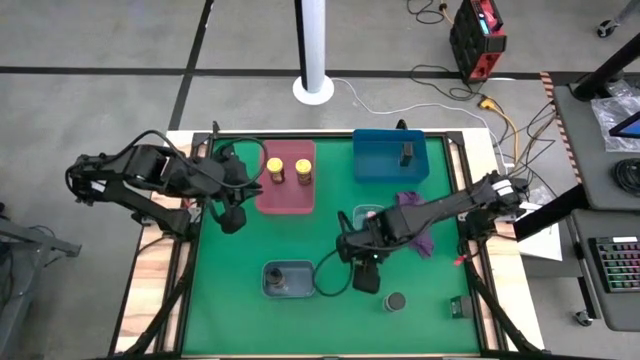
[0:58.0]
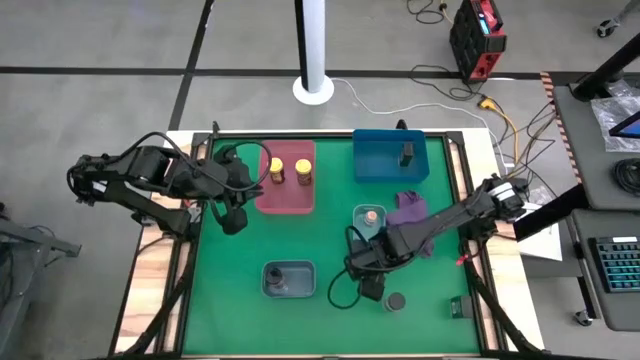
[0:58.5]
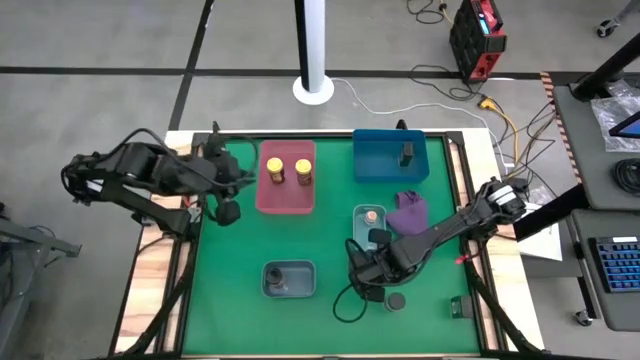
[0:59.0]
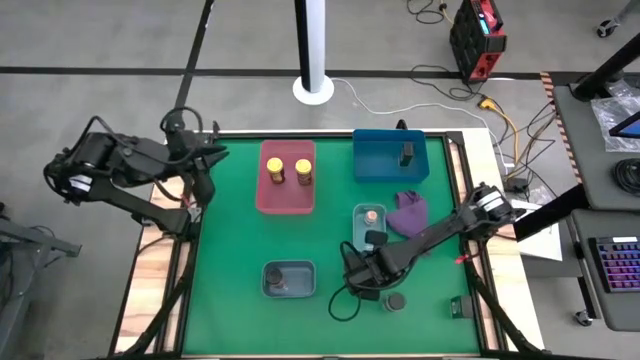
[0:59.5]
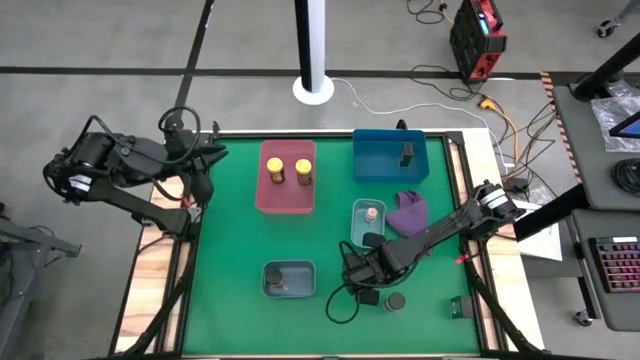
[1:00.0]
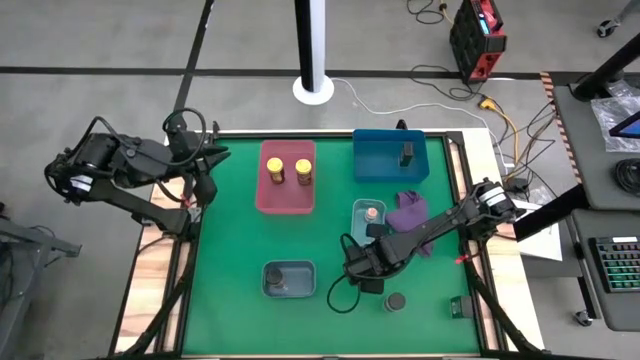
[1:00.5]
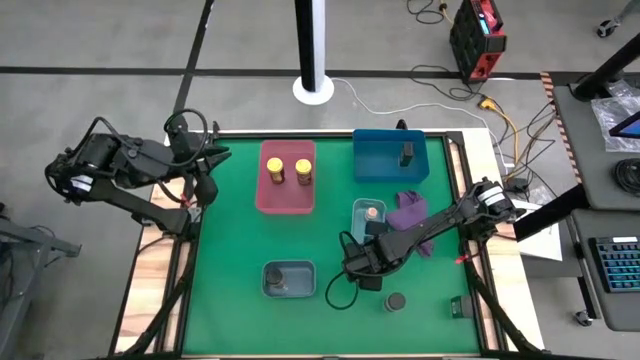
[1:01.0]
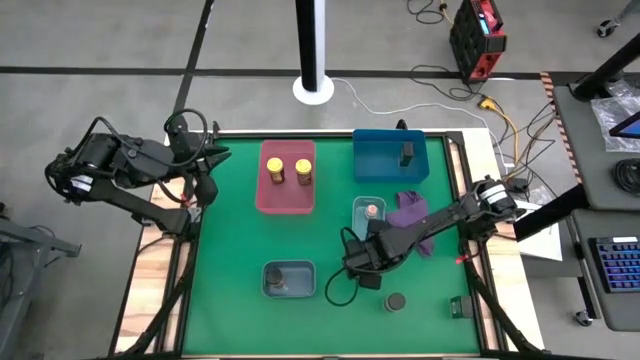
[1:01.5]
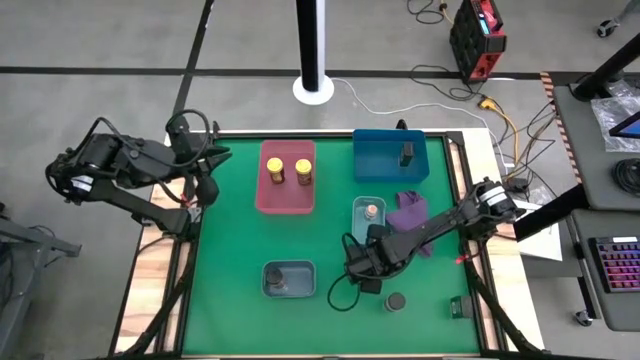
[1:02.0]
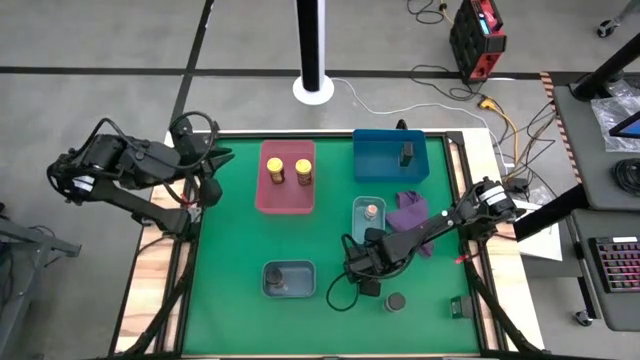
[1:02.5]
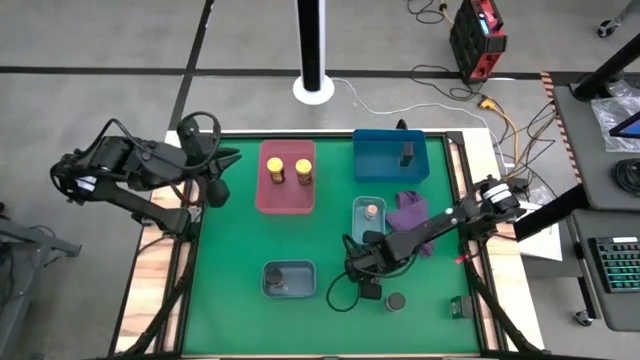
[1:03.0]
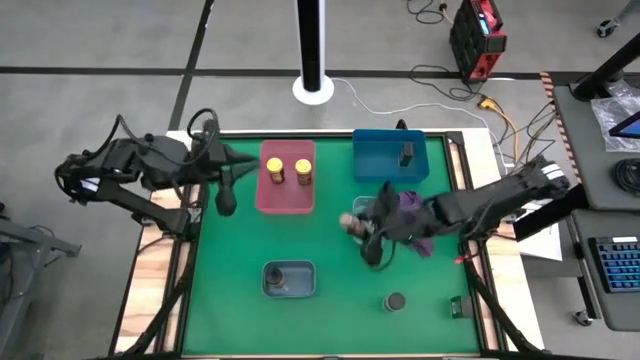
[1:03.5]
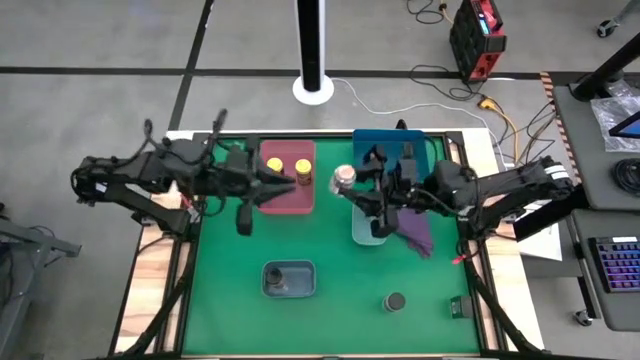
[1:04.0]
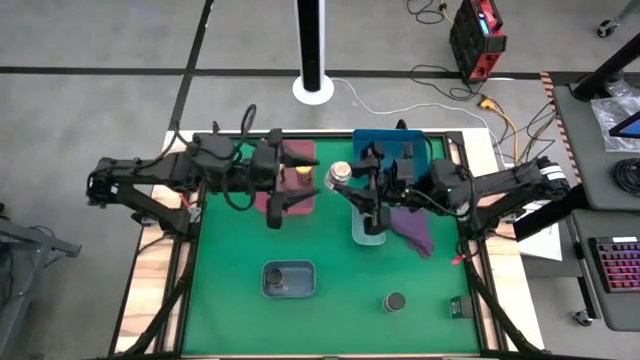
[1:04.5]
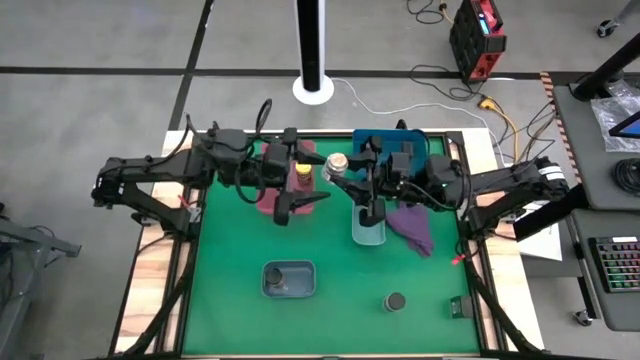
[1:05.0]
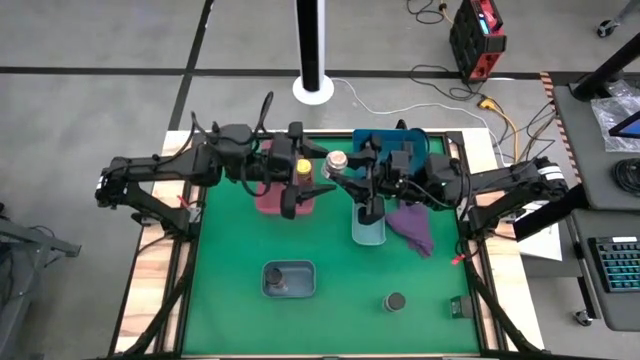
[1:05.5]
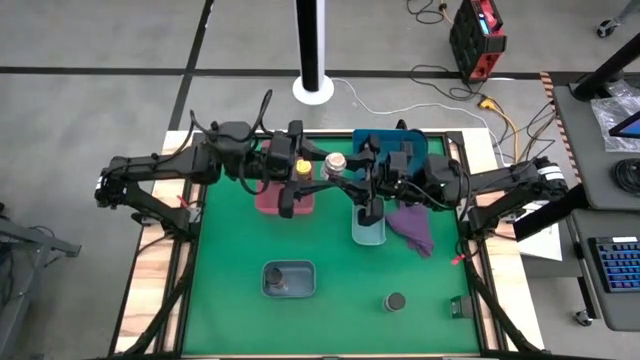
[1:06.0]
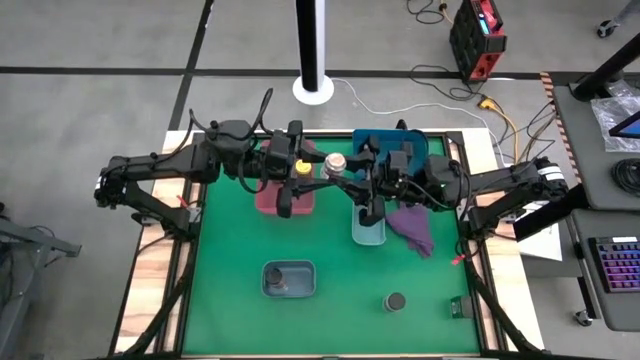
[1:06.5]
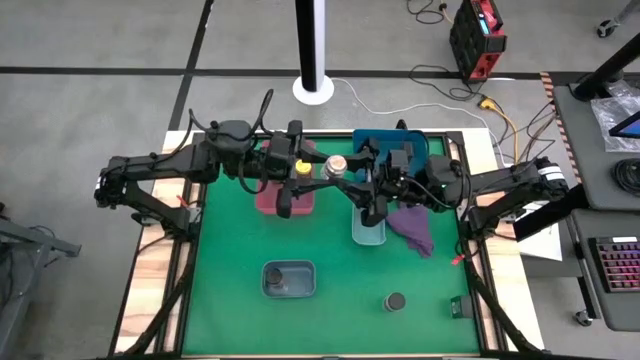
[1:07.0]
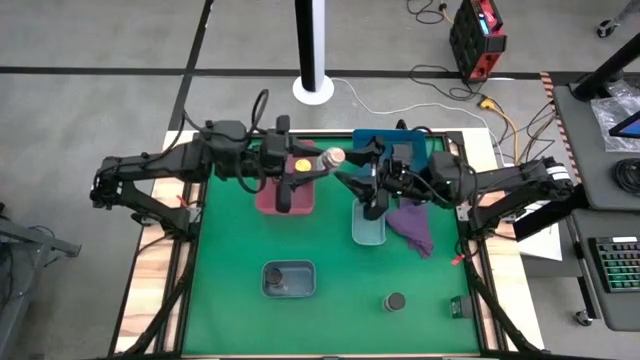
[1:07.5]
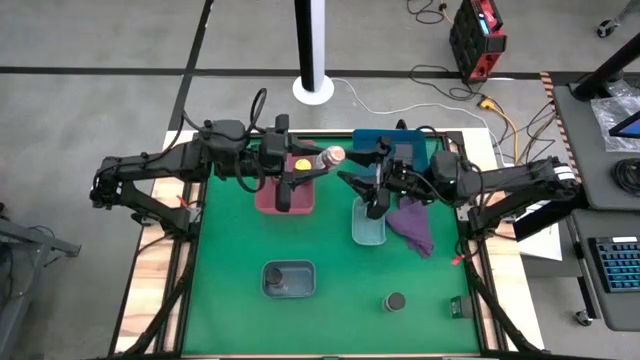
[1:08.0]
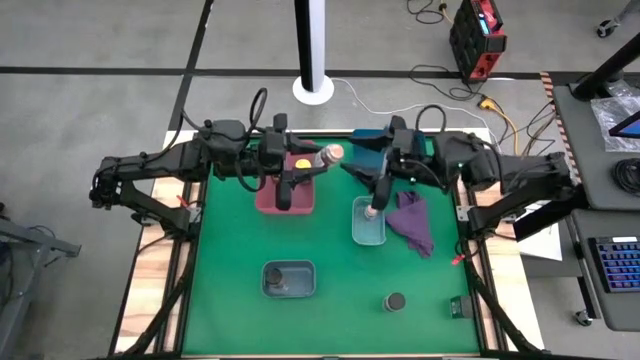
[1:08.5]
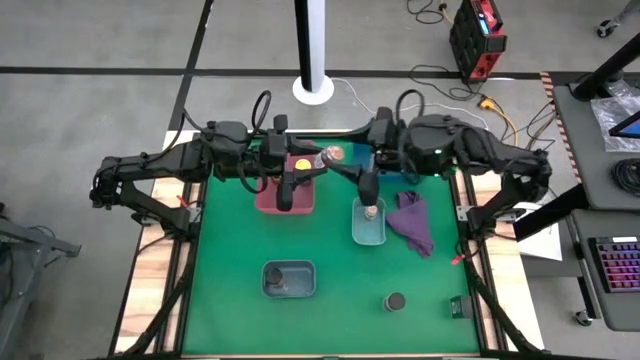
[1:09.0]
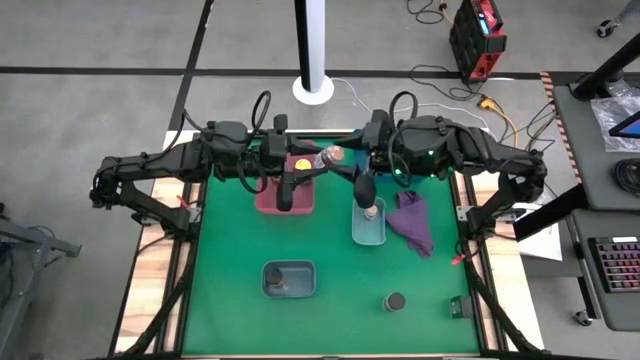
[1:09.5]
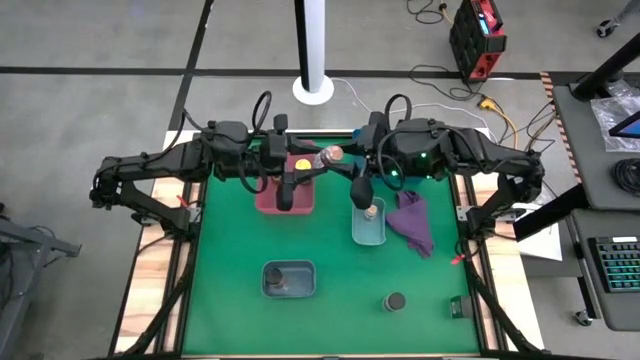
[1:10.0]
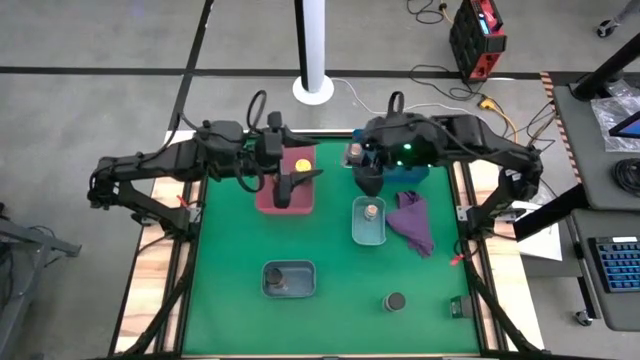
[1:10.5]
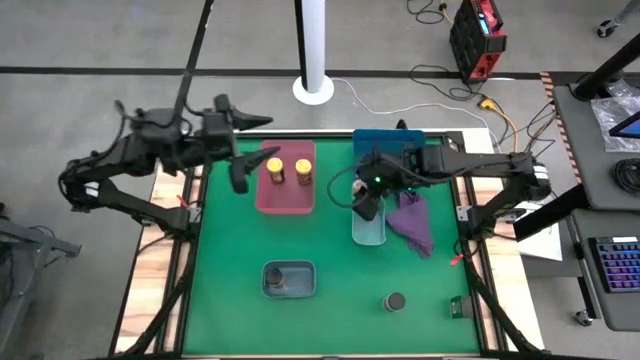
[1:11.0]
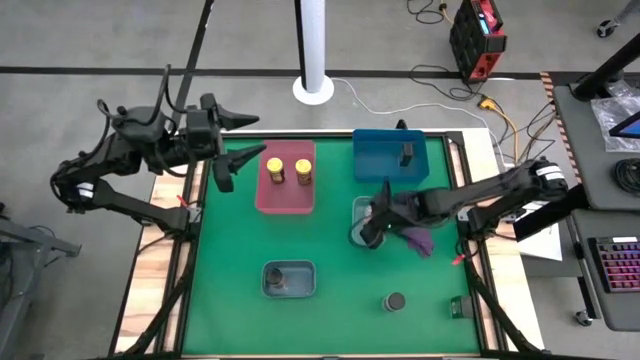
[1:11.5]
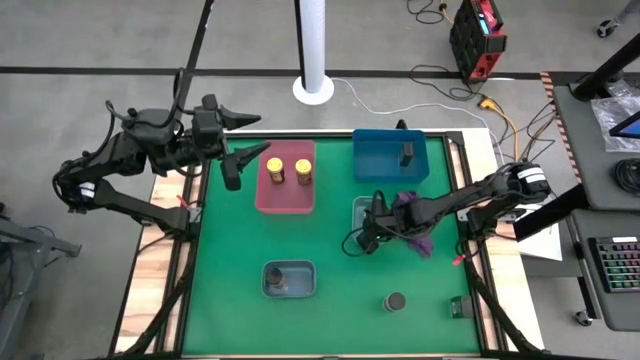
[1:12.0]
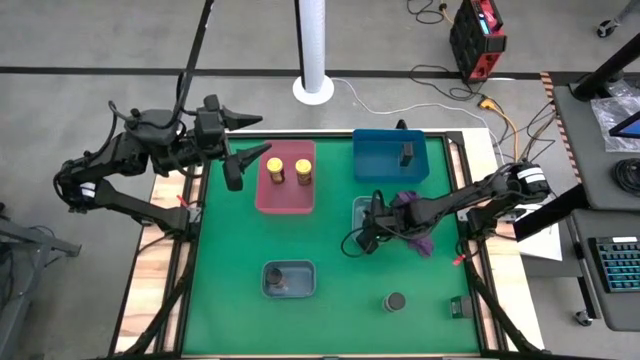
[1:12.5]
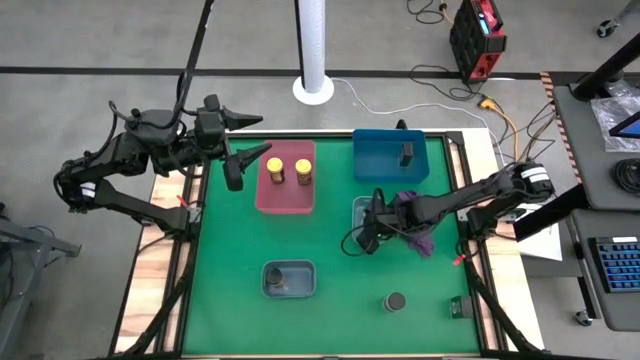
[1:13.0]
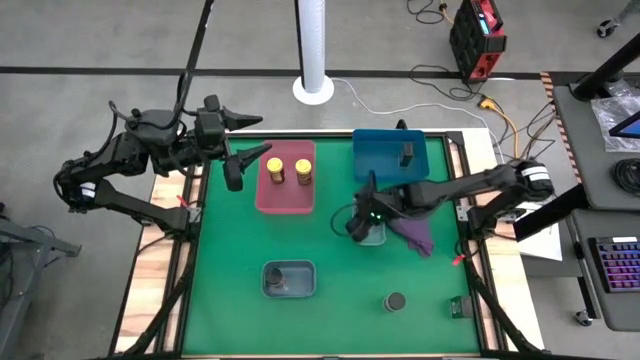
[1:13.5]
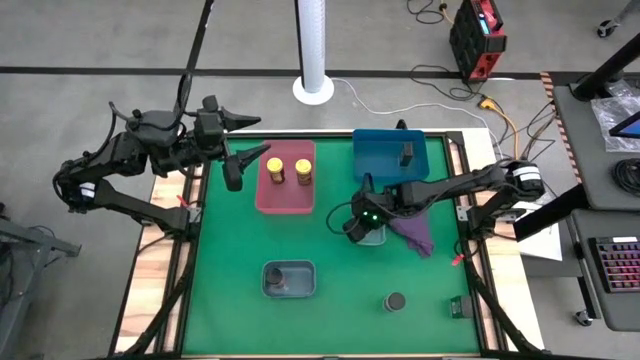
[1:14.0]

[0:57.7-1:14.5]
Task: Sort spices by type
Put the brown seasoning bottle into the small light blue bin

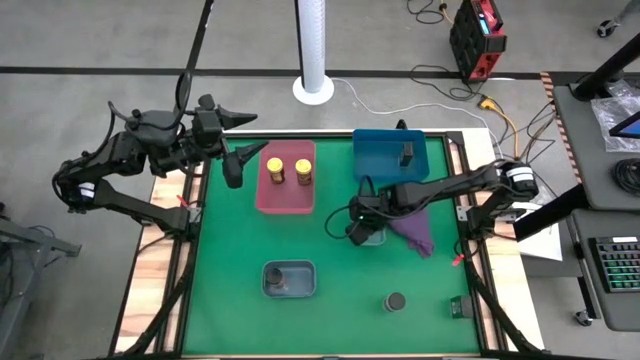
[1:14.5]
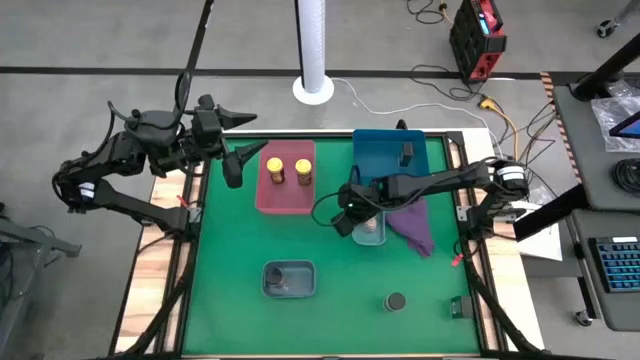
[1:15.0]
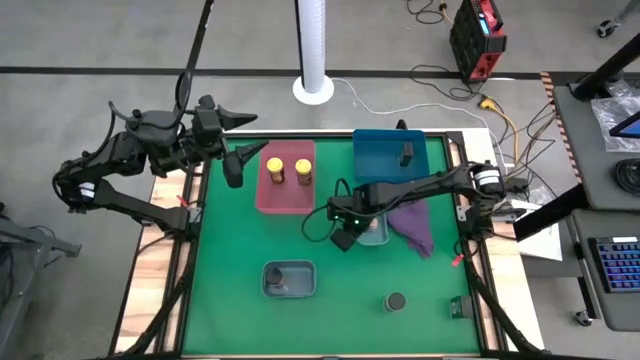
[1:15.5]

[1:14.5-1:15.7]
Adjust the small light blue bin

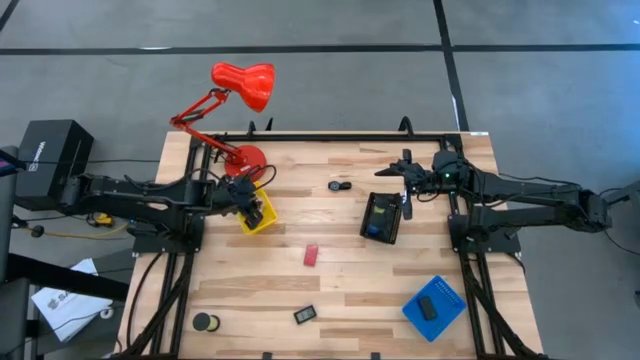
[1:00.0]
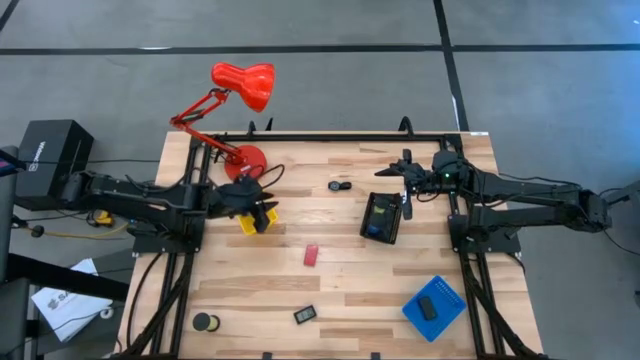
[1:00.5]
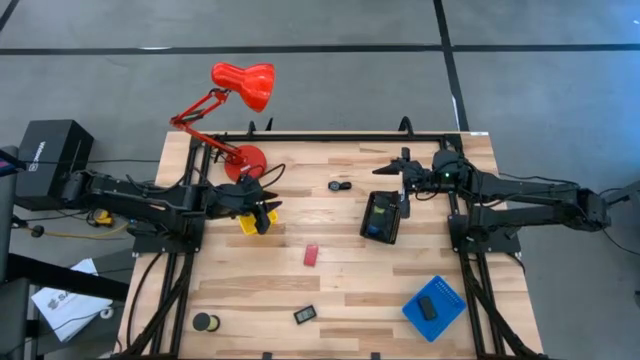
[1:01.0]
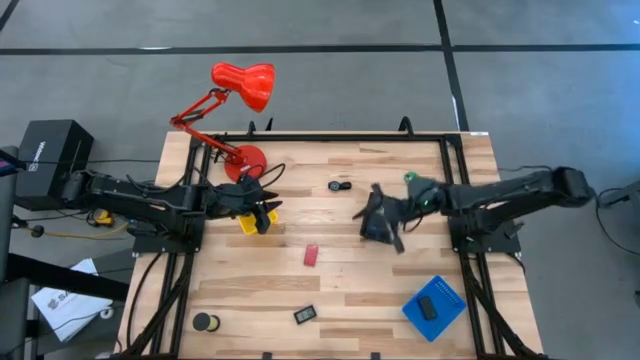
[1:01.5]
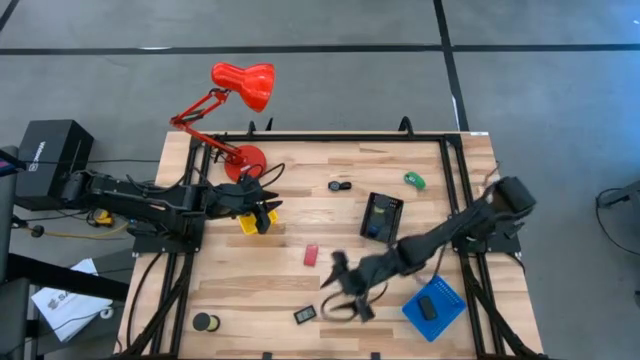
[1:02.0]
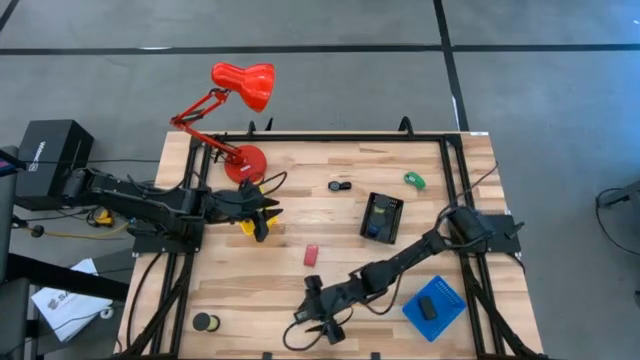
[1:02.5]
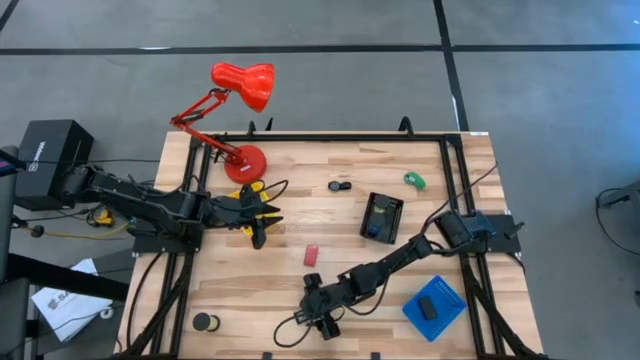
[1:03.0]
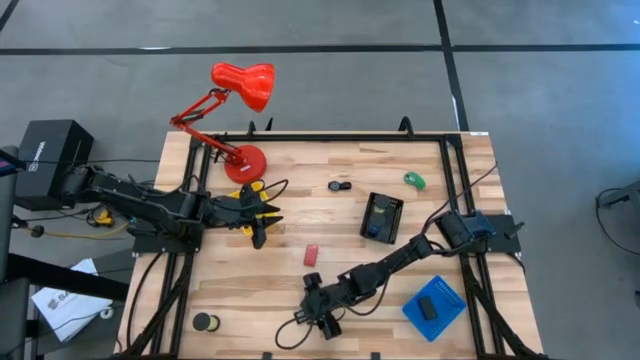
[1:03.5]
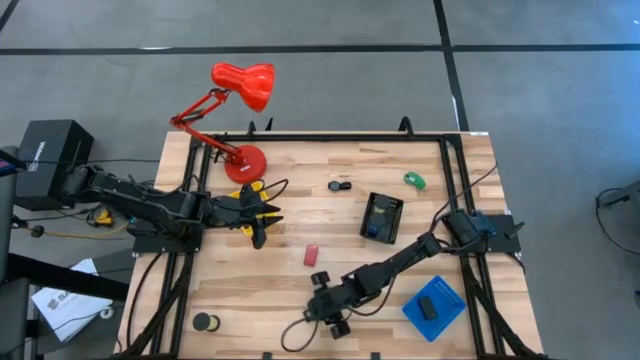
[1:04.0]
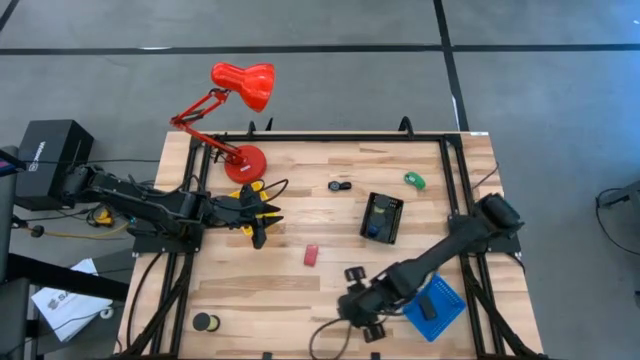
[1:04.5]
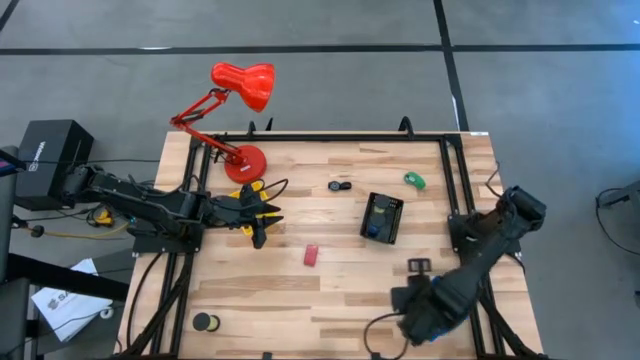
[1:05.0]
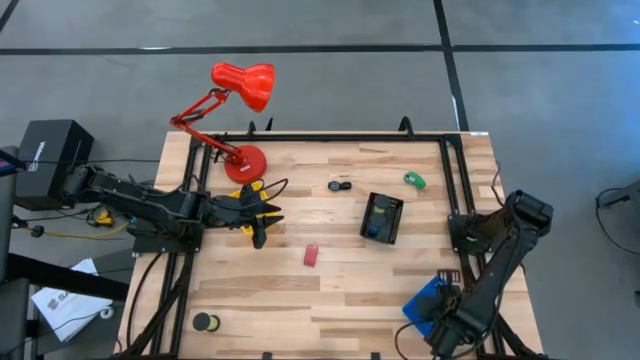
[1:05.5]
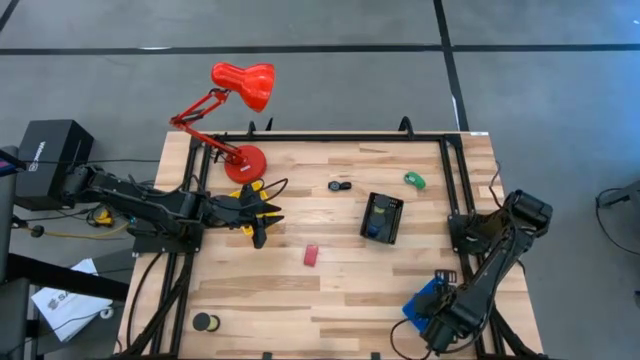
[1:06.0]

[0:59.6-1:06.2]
Task: Pick & Place Office items
Put the black digital timer into the blue bin
